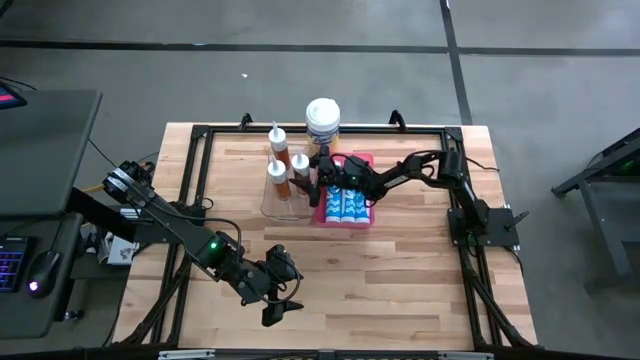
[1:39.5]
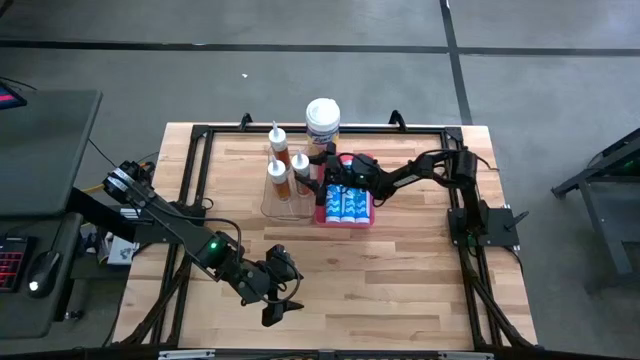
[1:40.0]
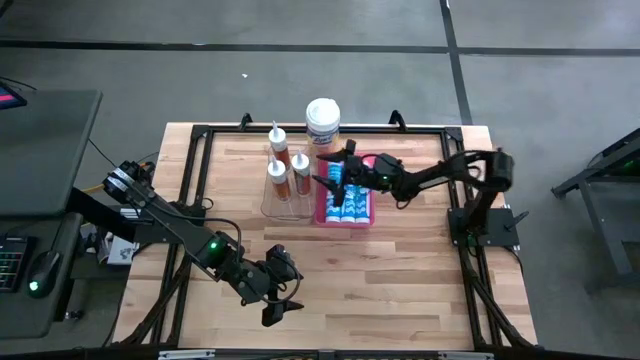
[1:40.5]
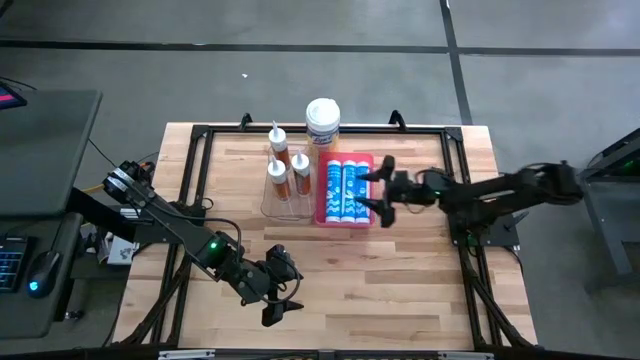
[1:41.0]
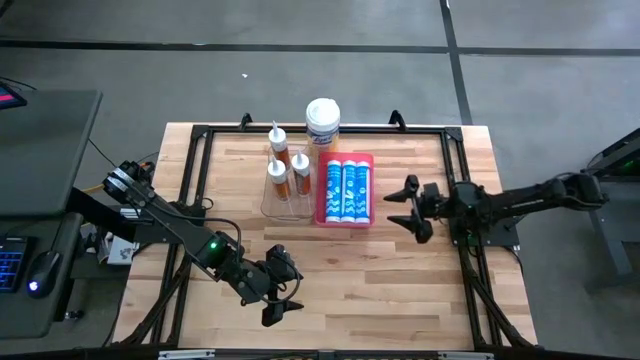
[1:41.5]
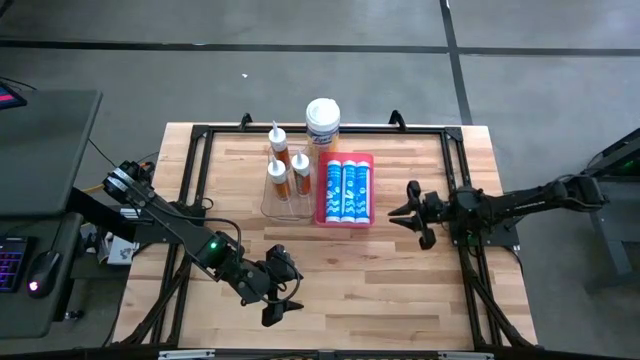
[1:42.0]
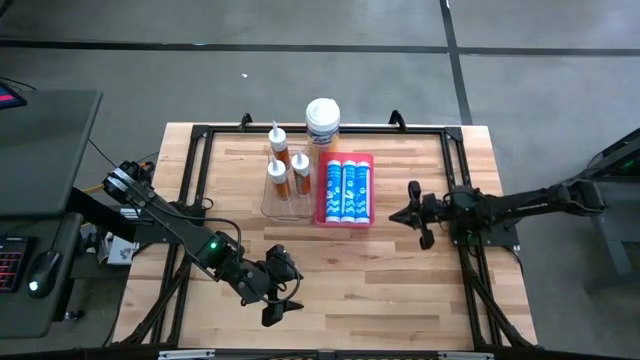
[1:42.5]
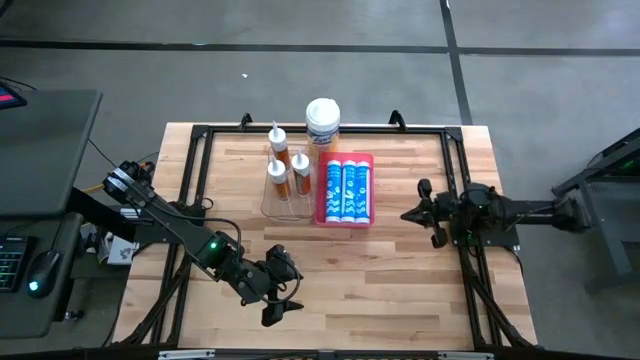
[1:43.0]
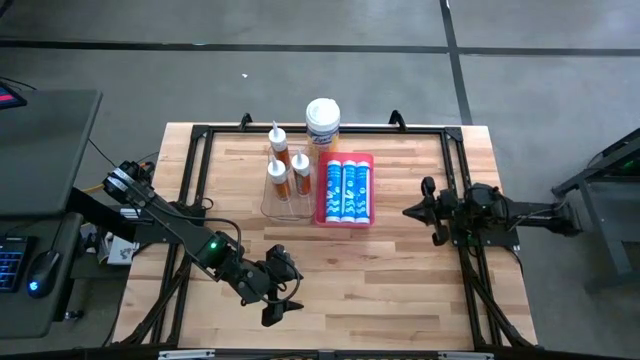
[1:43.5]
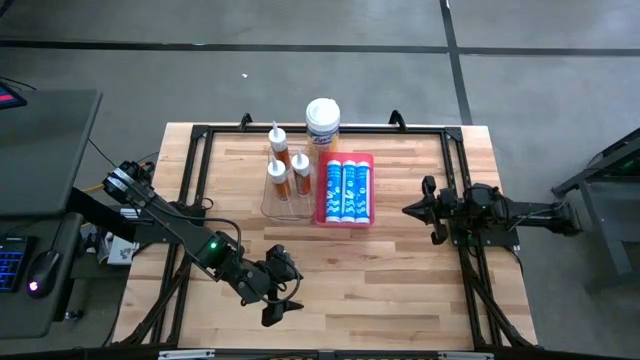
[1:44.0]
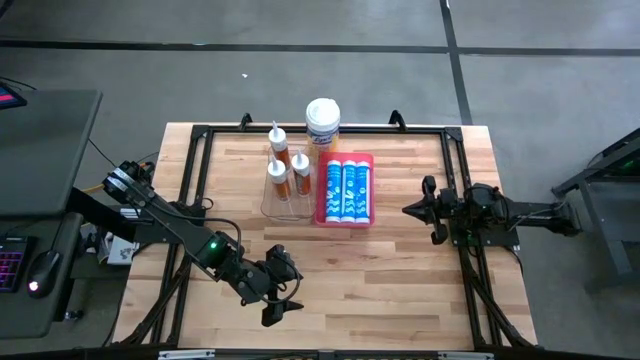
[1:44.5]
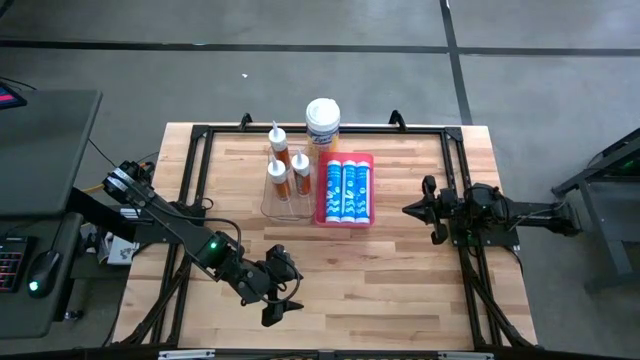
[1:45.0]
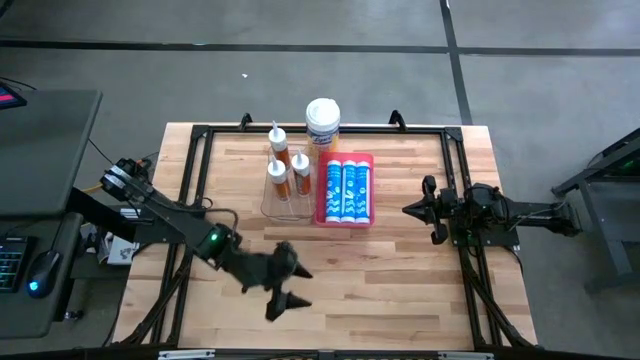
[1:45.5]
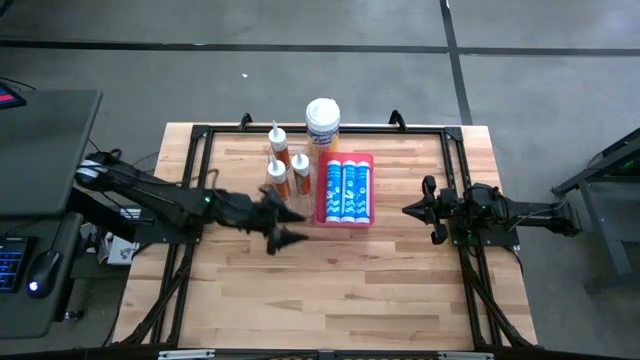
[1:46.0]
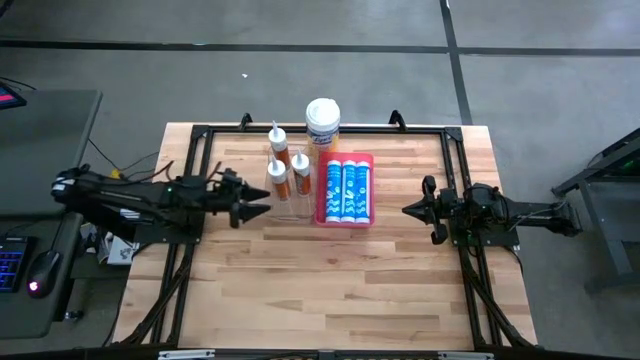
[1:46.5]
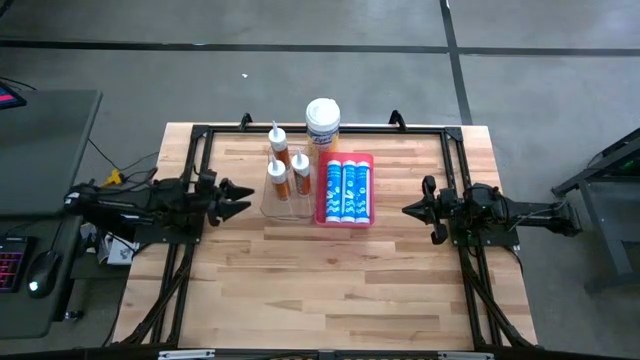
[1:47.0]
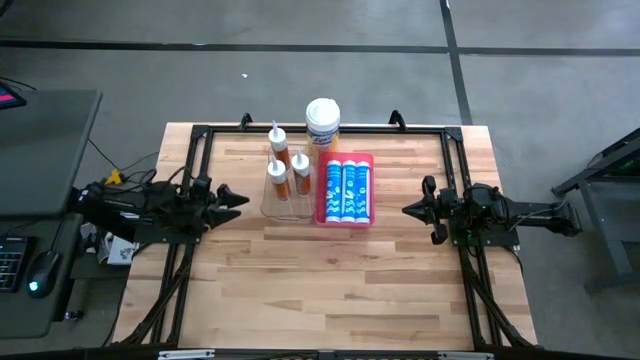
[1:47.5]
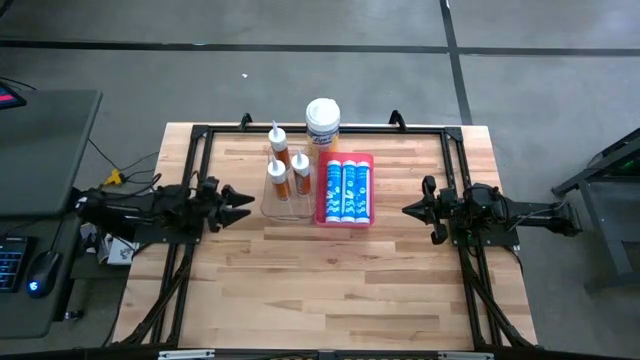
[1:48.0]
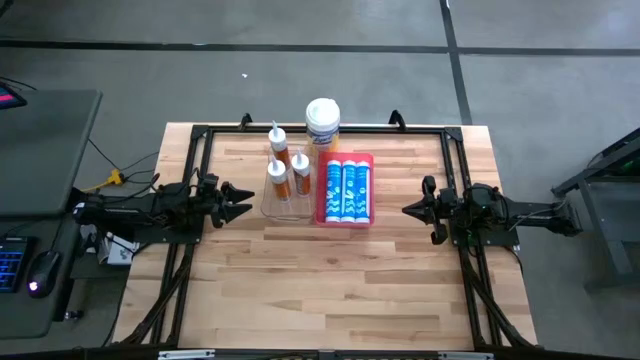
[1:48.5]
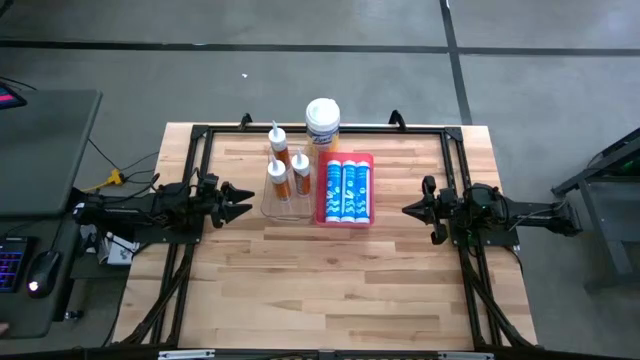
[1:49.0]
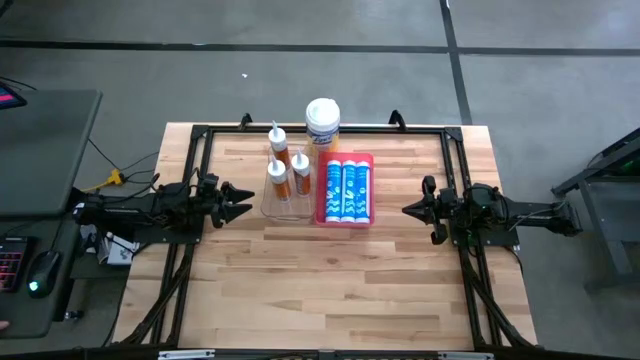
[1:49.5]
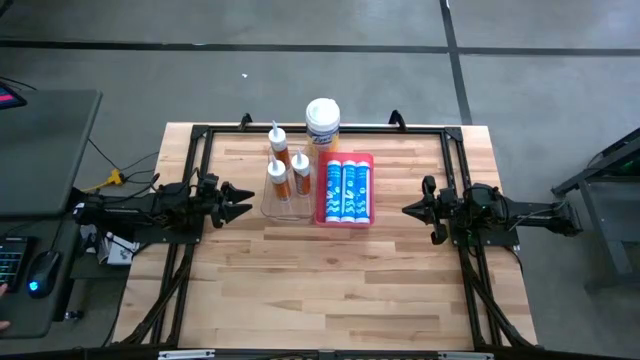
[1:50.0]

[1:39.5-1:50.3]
Task: Pick & place silicon tubes, Sealant and Lysol wipes
Return to Home Position

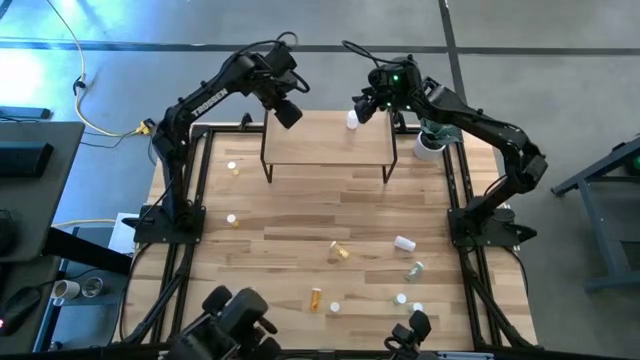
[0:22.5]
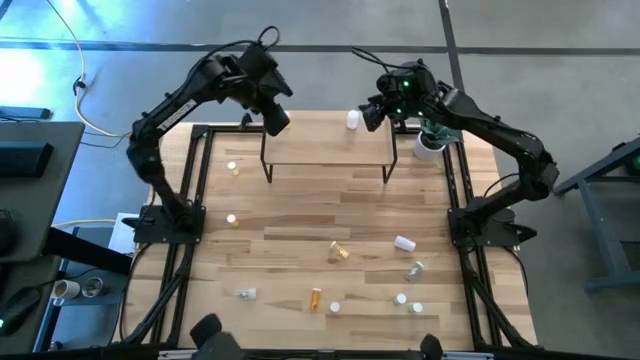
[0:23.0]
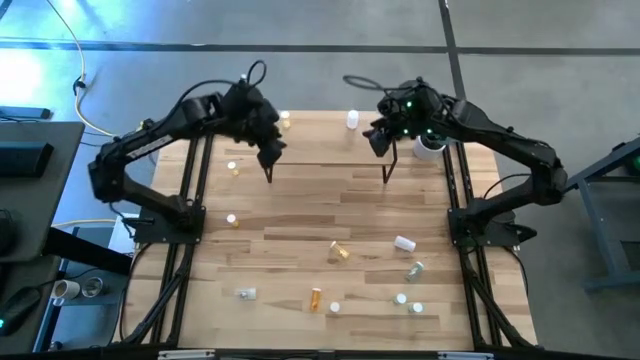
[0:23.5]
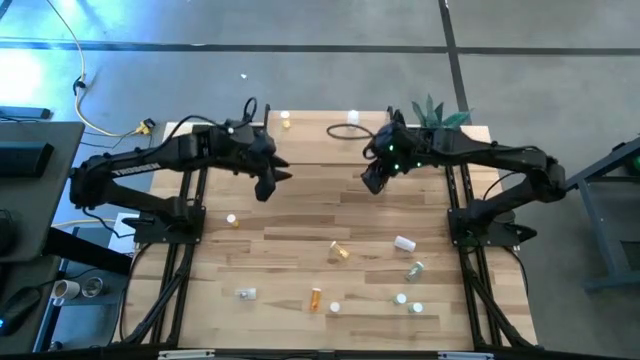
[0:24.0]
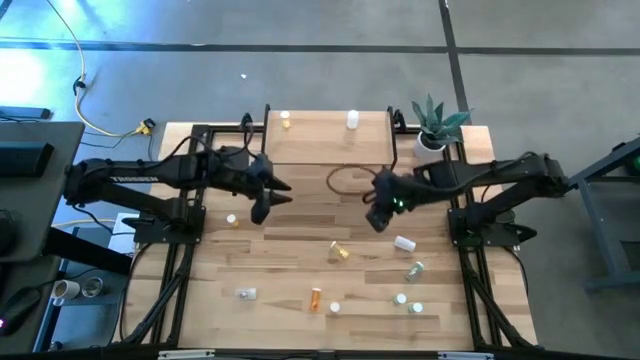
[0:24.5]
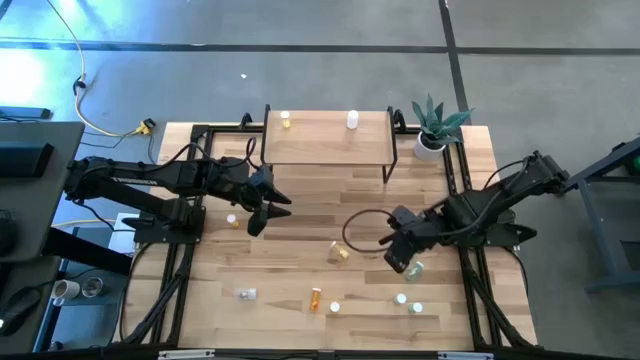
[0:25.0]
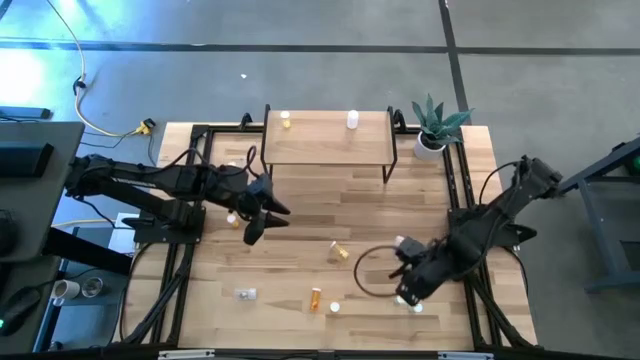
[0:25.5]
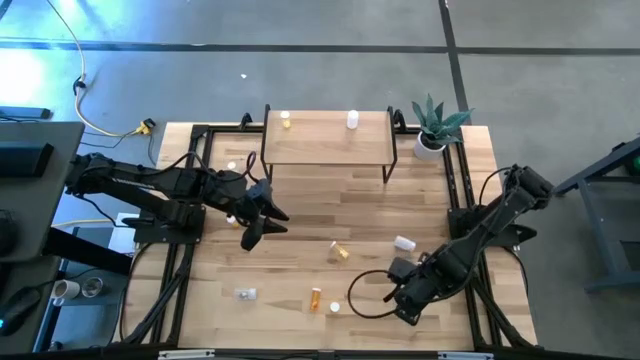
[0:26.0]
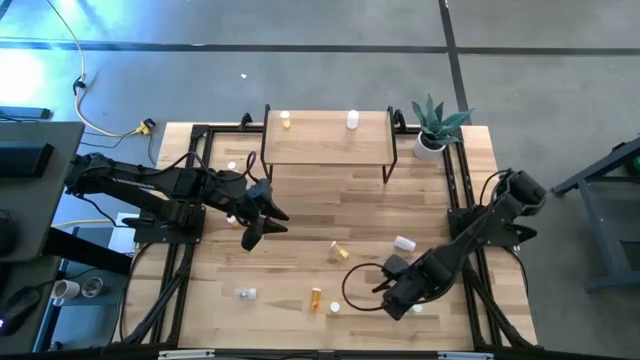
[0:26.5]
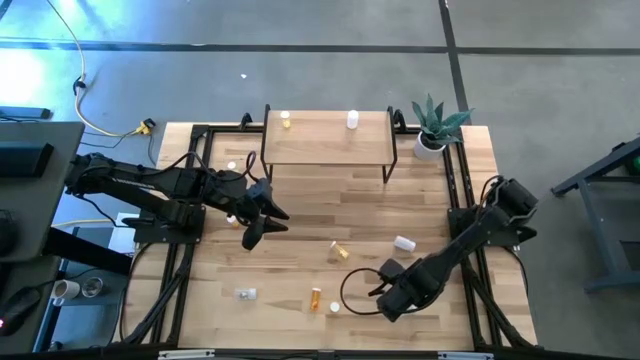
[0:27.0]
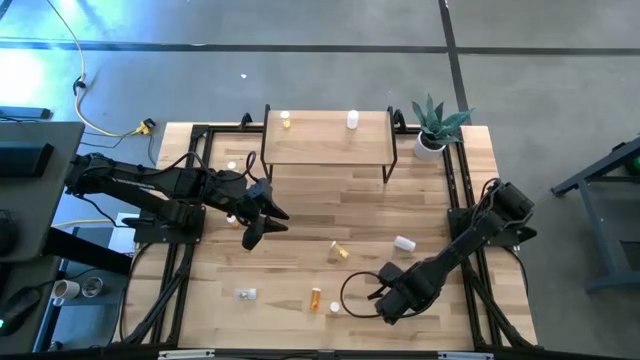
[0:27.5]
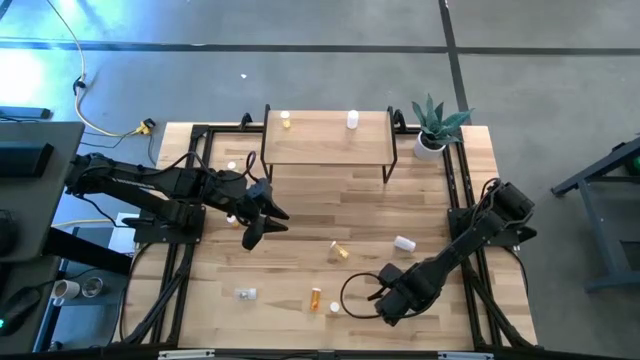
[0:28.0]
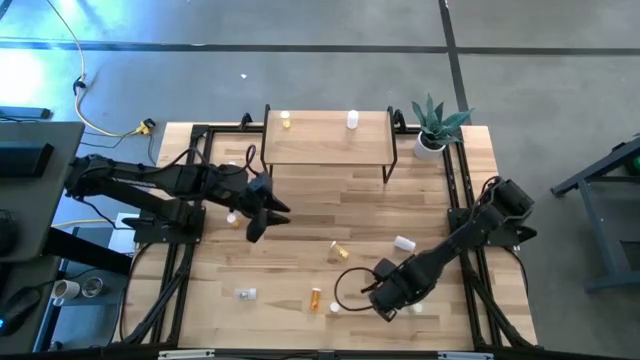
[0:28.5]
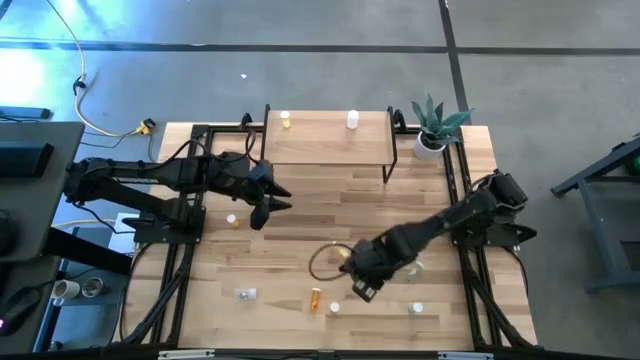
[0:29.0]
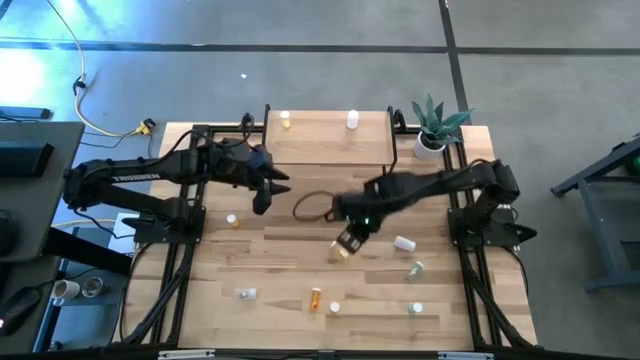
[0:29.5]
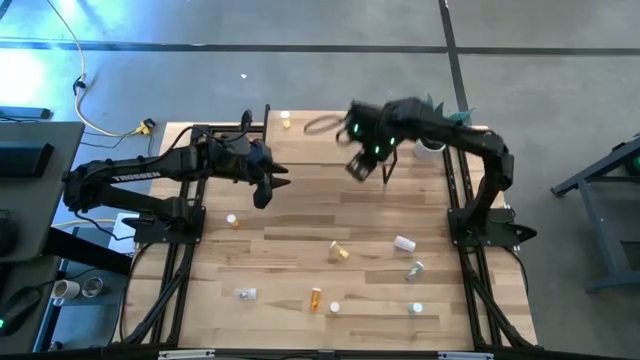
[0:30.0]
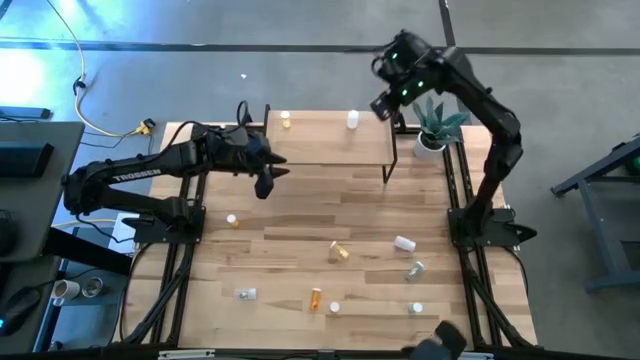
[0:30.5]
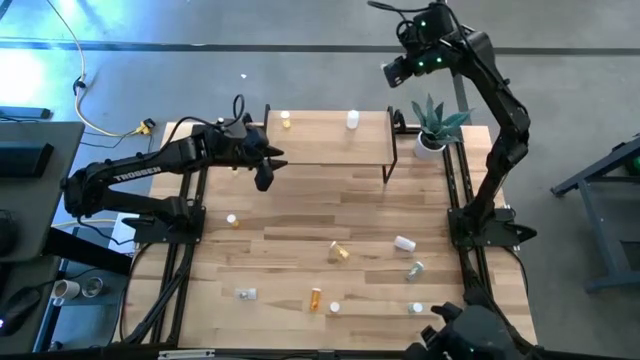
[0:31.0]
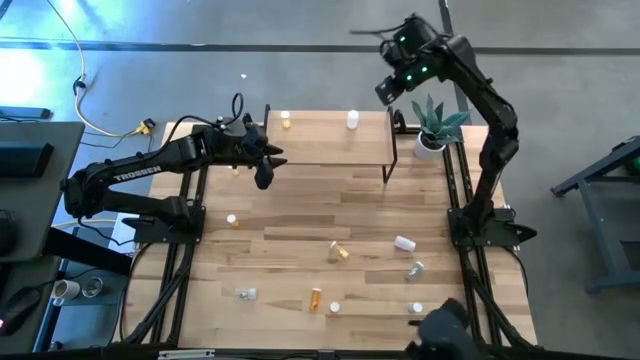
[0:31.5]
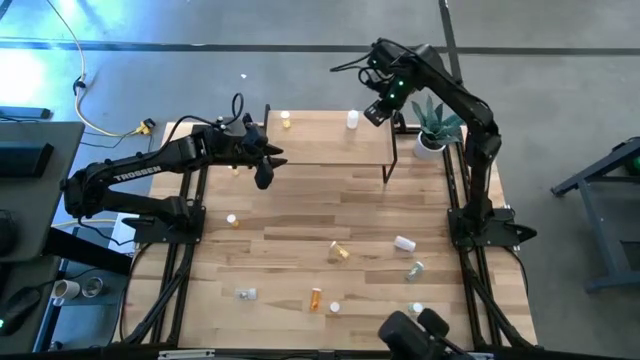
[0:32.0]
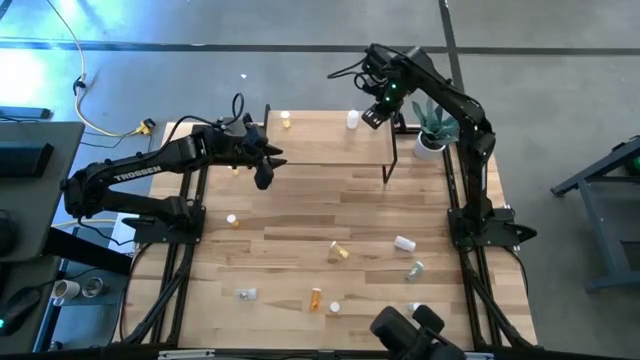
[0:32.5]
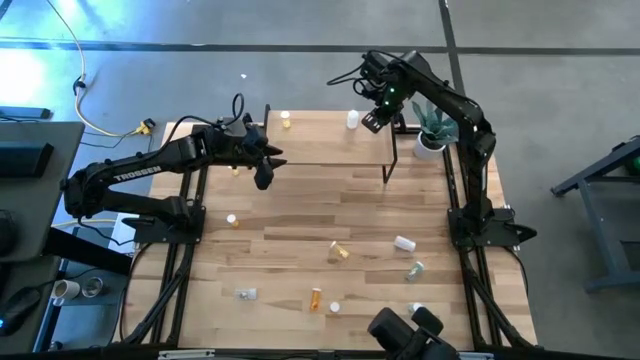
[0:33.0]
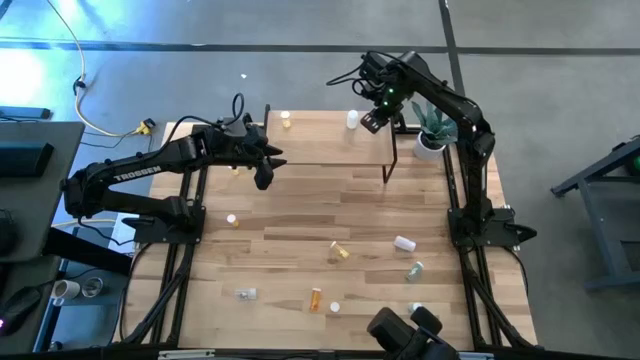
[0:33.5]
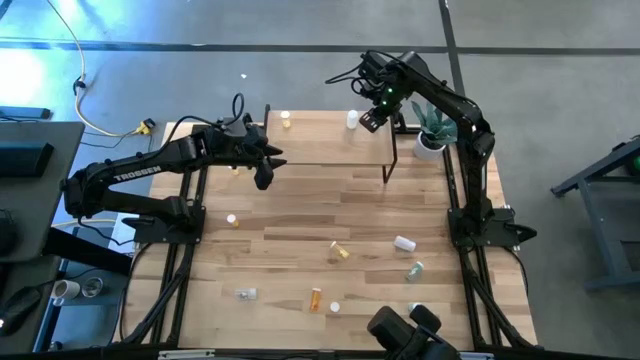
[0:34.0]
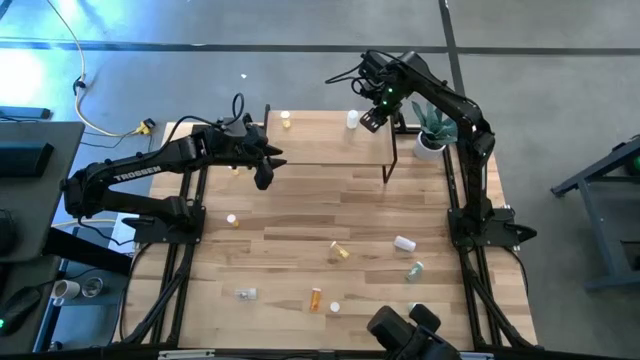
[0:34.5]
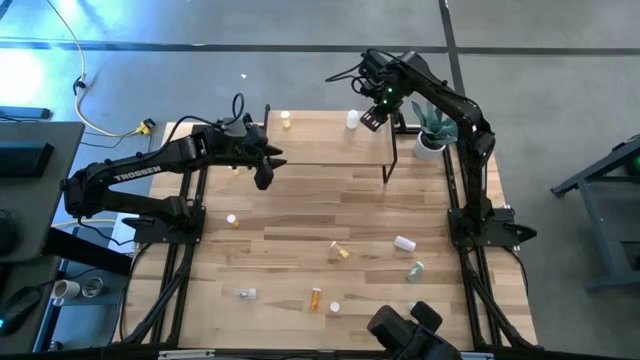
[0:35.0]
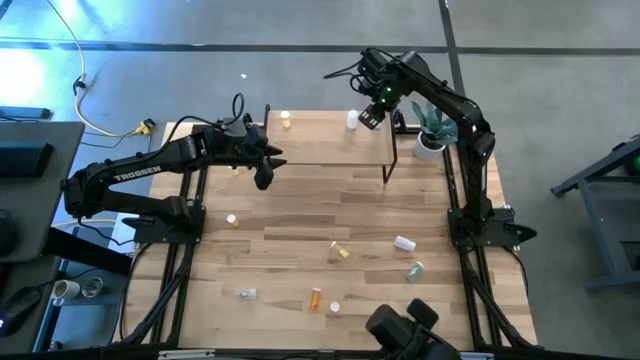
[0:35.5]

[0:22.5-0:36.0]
Task: Pick and place medicine bottles onto shelf by color
Put the bottom right blue pill bottle on the shelf
